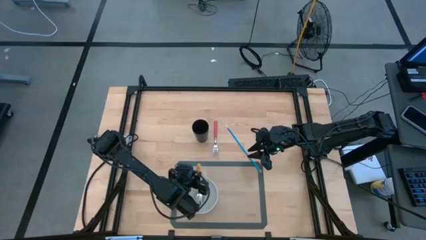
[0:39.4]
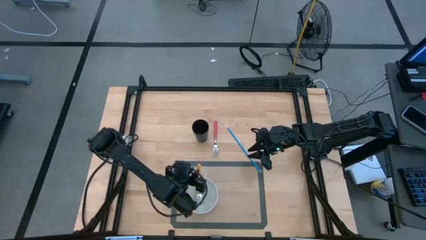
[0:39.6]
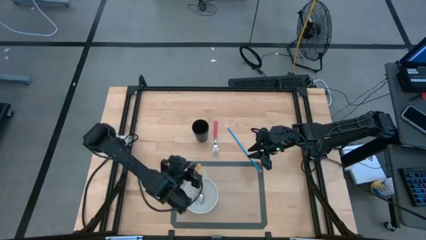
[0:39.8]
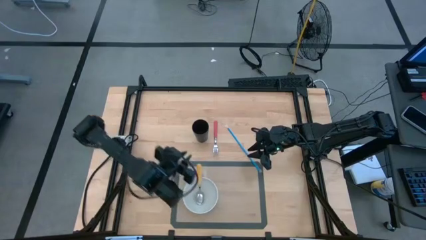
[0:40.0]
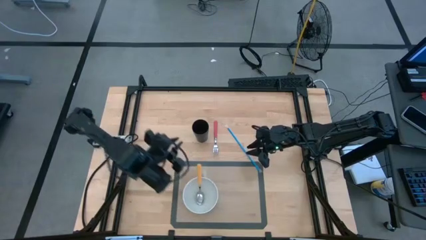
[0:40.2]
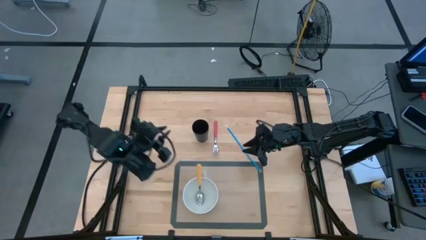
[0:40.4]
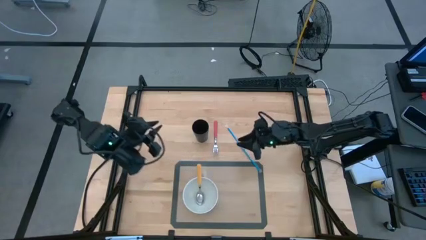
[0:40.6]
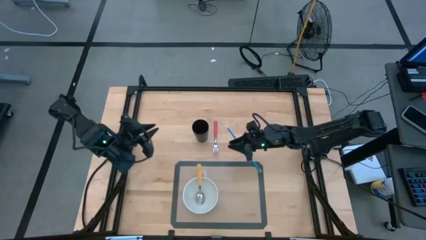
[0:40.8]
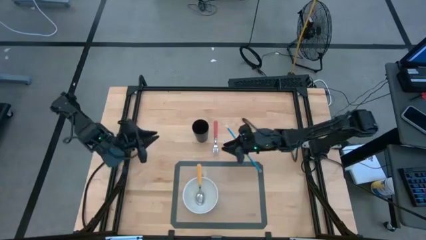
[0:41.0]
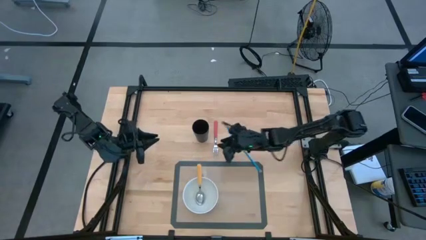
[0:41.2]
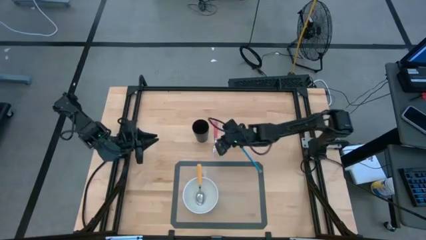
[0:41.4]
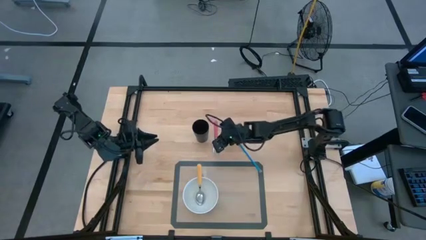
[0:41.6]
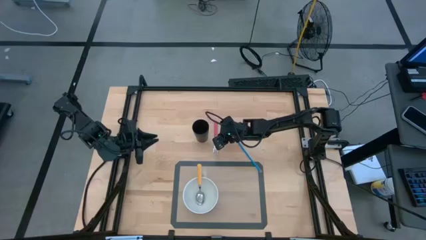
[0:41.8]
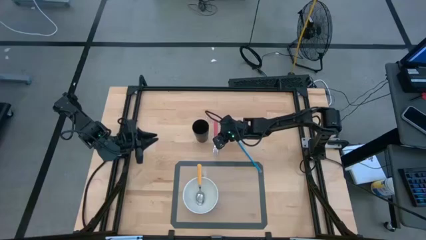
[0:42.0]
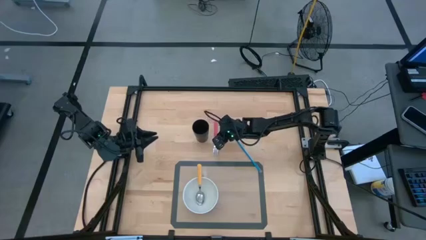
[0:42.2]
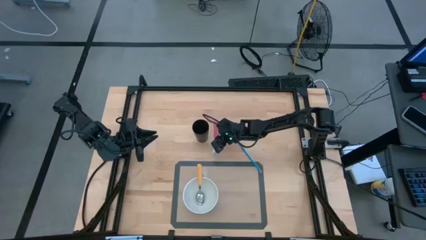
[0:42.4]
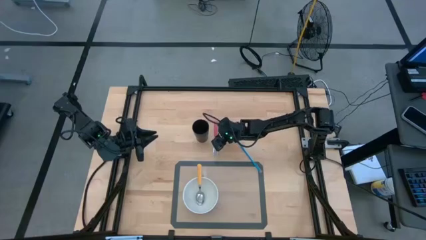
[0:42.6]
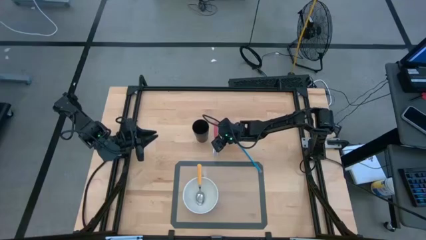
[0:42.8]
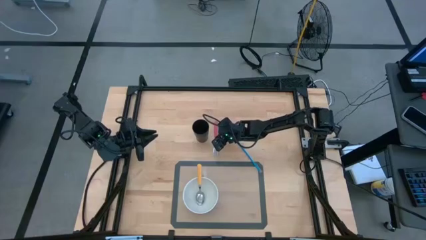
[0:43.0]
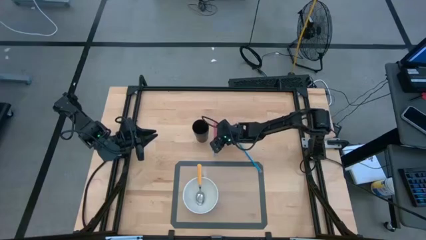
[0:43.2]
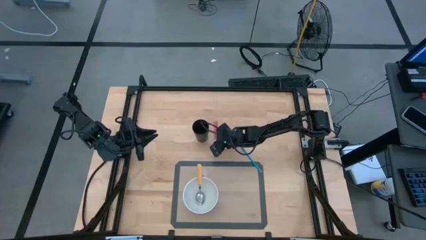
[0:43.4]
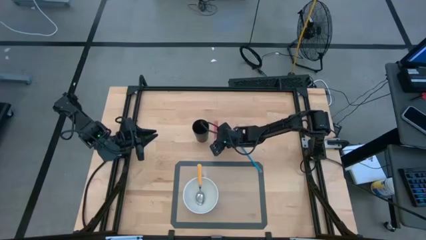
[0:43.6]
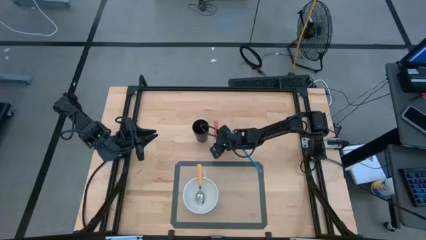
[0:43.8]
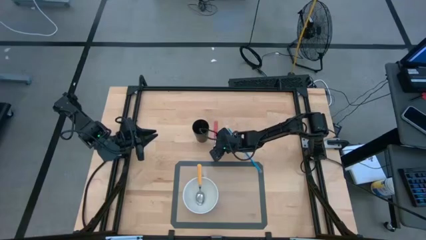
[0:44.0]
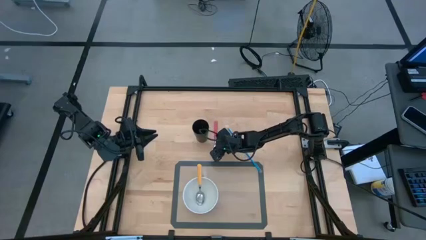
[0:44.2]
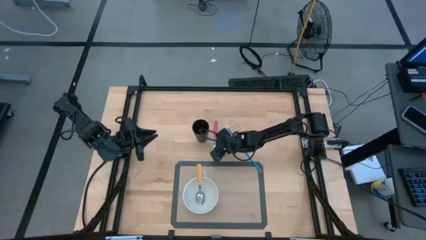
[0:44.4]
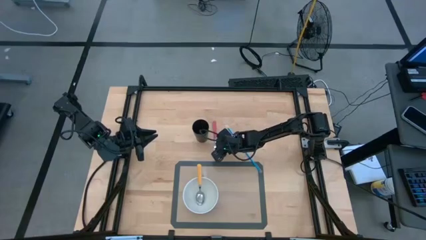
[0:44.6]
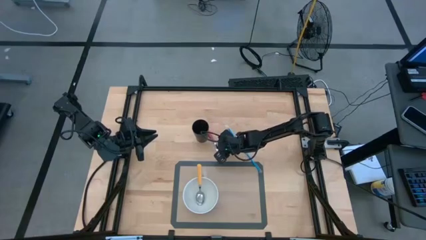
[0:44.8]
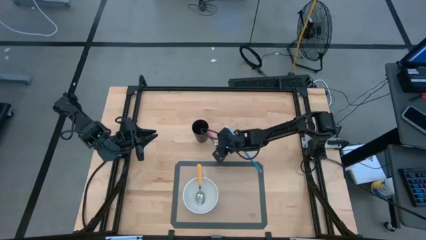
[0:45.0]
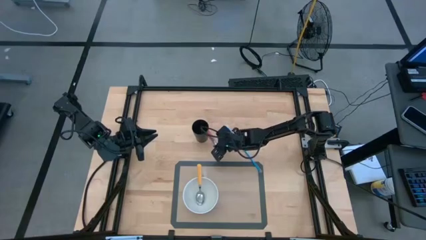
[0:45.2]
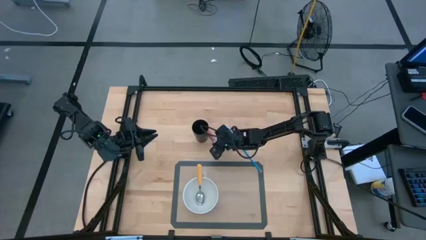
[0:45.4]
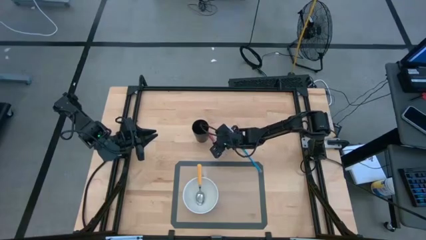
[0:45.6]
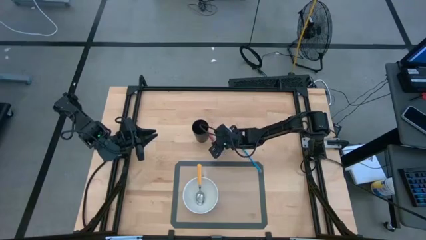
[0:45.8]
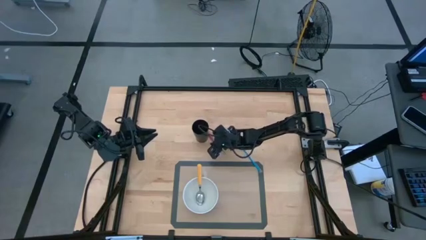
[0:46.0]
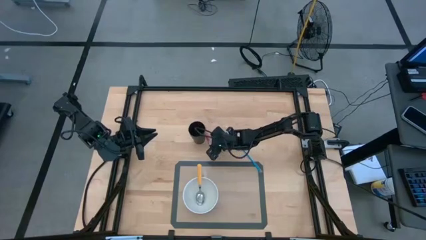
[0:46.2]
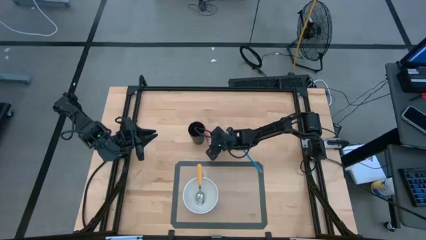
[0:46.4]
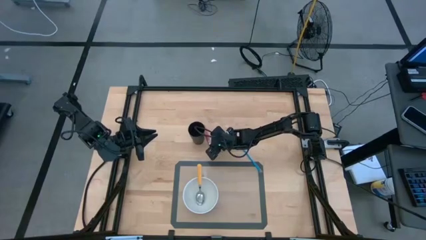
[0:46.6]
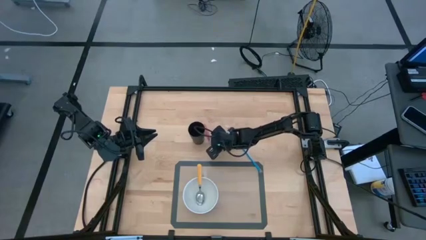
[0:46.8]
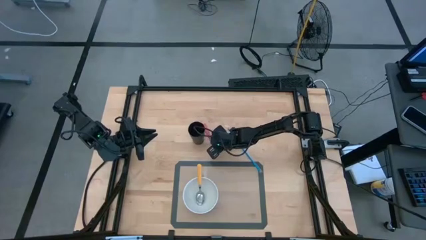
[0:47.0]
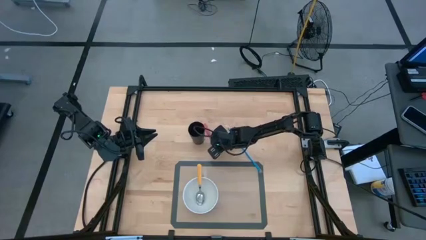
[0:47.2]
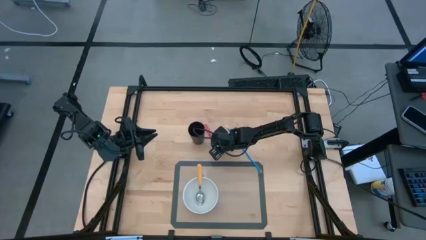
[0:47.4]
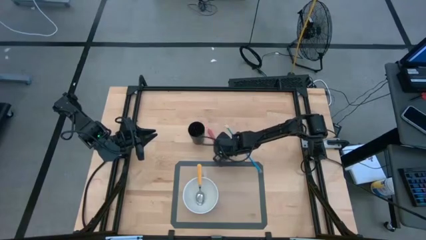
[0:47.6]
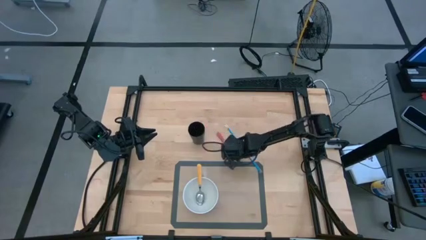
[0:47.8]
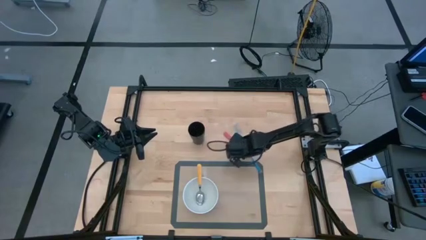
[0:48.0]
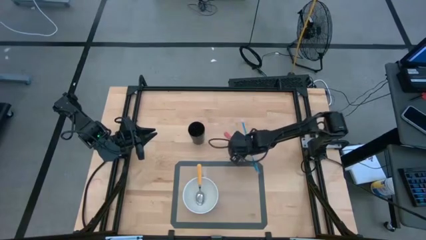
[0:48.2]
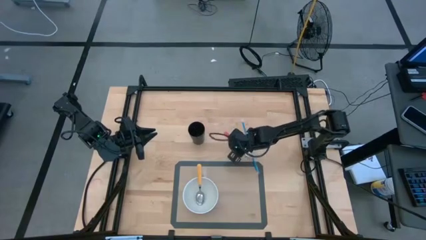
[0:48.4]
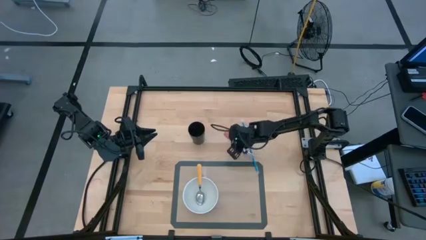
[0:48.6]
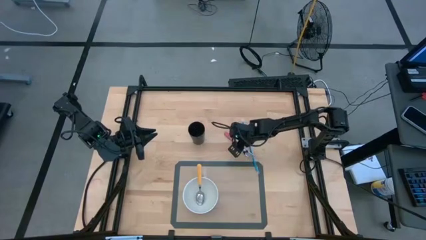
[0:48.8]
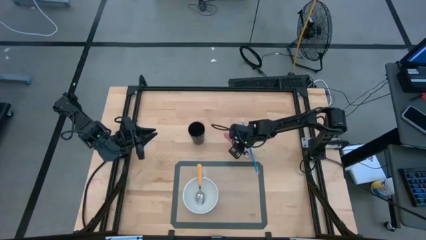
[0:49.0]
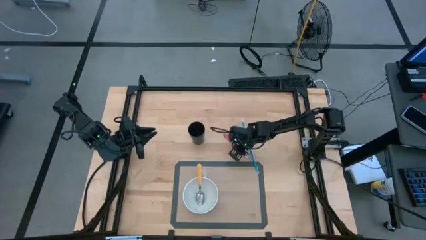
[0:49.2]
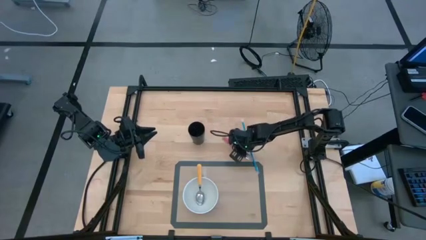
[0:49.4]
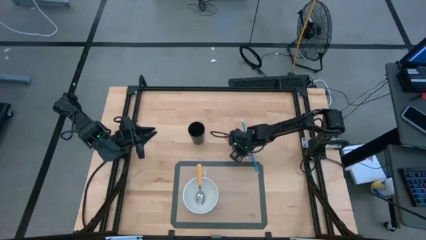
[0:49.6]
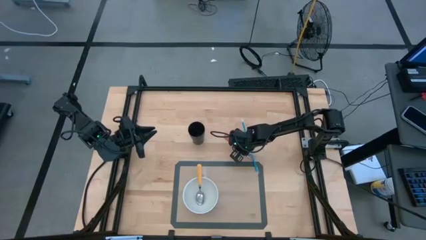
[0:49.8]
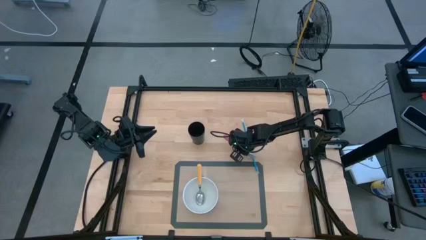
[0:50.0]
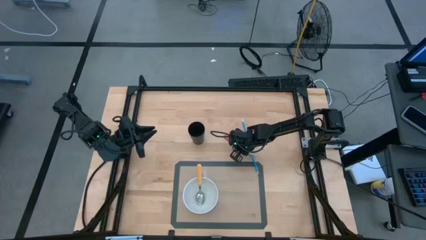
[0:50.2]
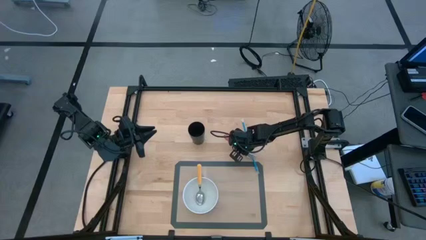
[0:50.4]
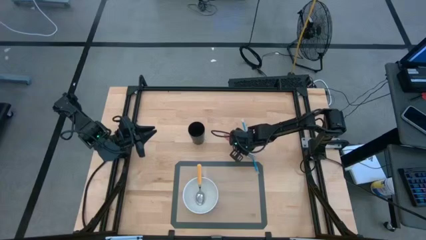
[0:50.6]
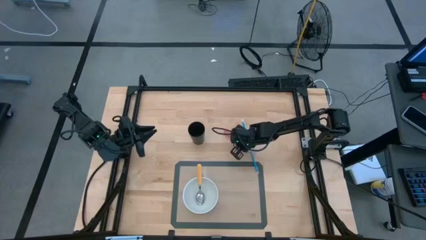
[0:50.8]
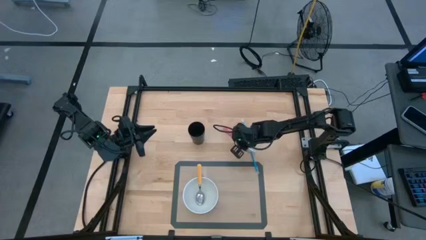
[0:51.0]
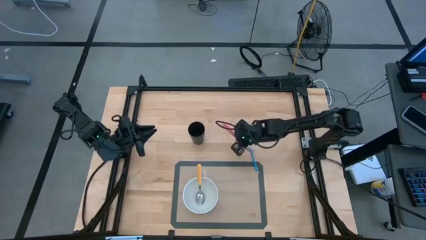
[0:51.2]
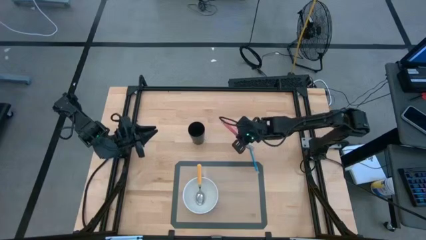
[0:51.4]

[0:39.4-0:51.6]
Task: Pick & Place Utensil
Put the pink fork into the white bowl on the mat

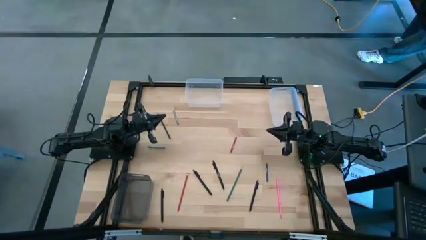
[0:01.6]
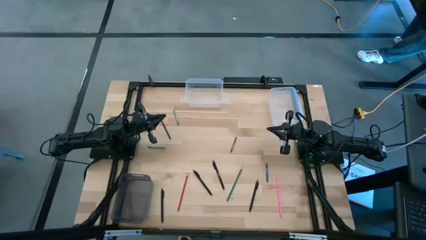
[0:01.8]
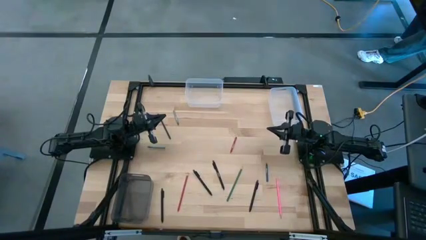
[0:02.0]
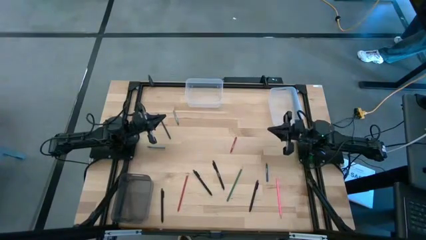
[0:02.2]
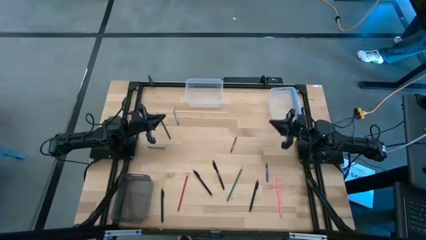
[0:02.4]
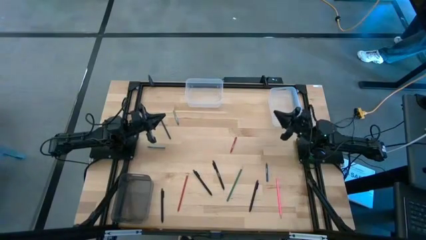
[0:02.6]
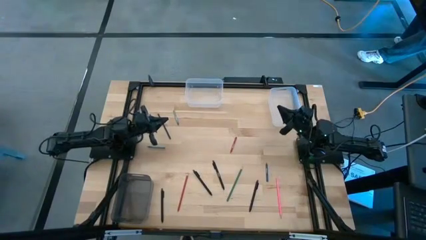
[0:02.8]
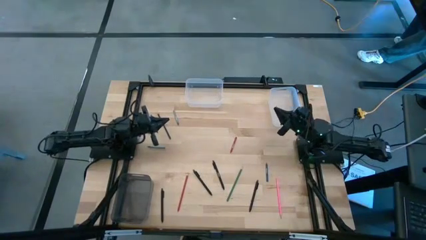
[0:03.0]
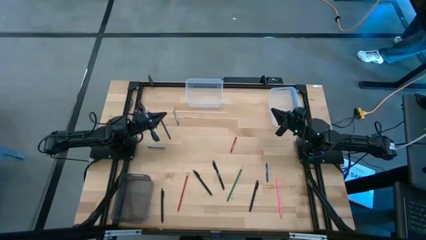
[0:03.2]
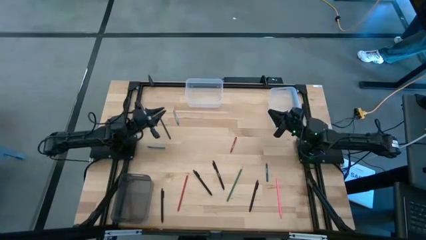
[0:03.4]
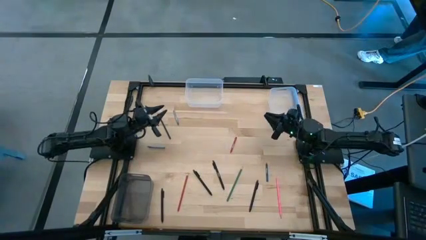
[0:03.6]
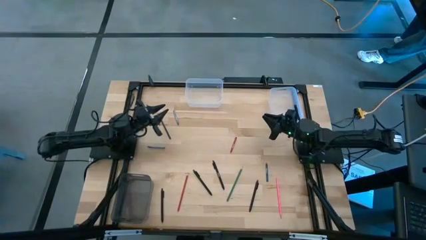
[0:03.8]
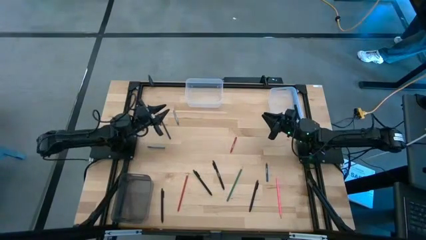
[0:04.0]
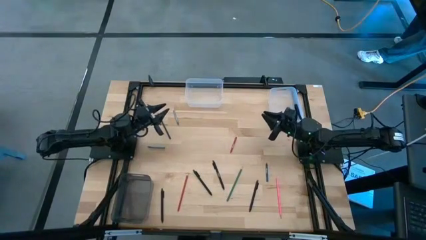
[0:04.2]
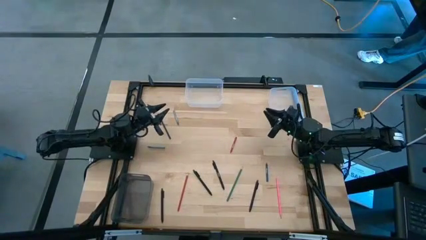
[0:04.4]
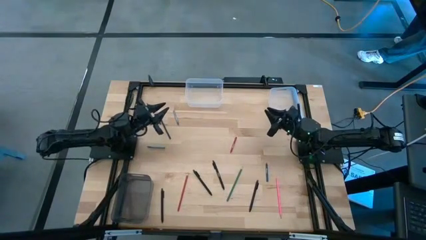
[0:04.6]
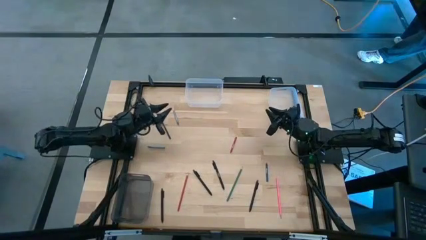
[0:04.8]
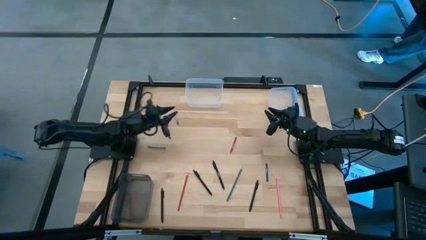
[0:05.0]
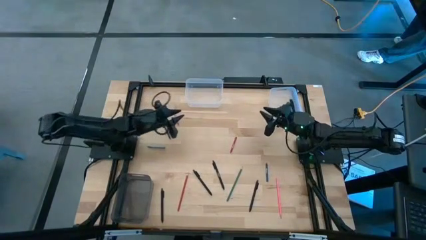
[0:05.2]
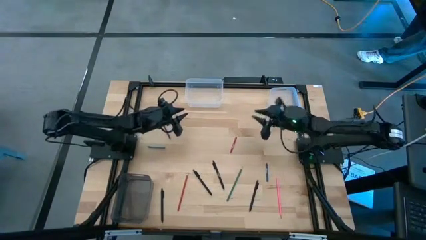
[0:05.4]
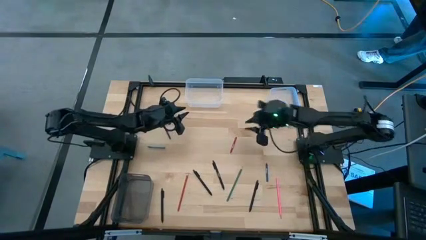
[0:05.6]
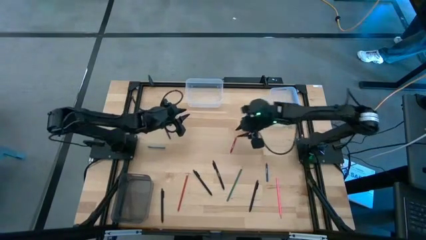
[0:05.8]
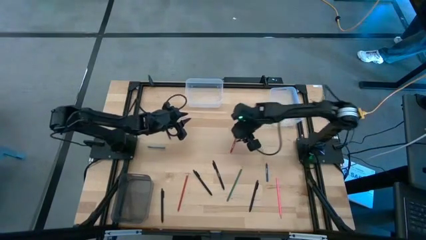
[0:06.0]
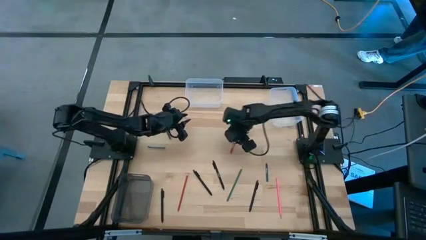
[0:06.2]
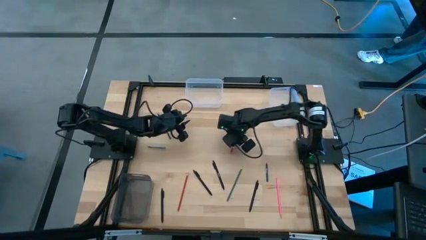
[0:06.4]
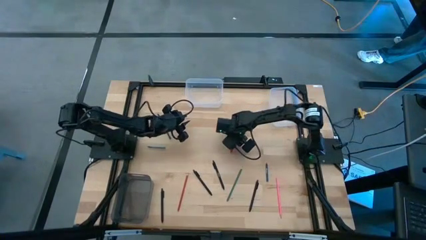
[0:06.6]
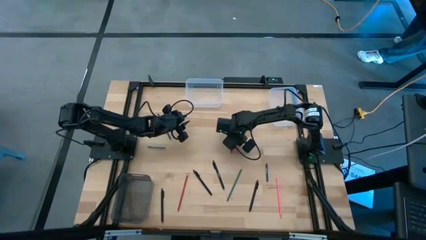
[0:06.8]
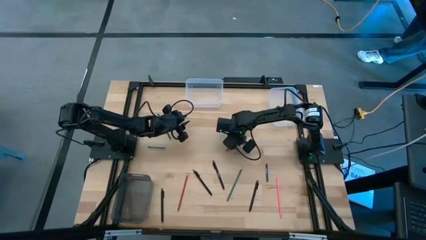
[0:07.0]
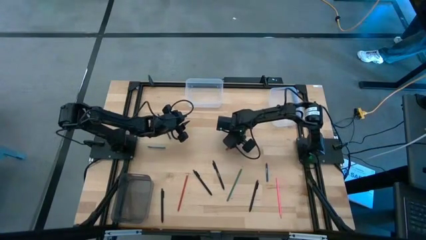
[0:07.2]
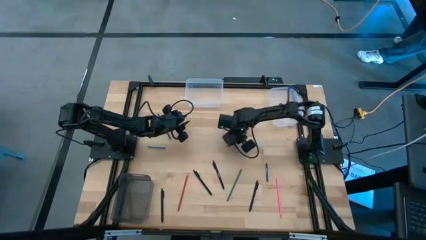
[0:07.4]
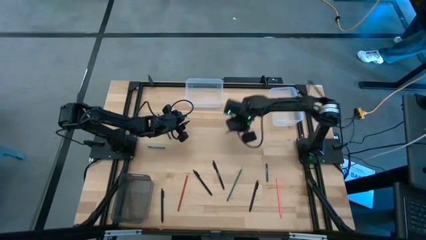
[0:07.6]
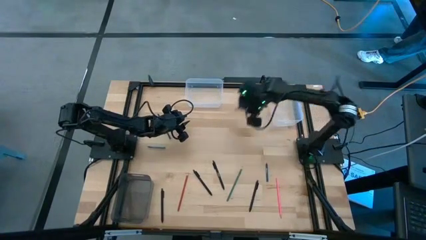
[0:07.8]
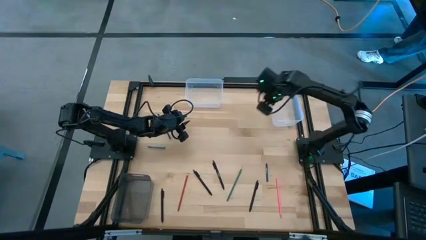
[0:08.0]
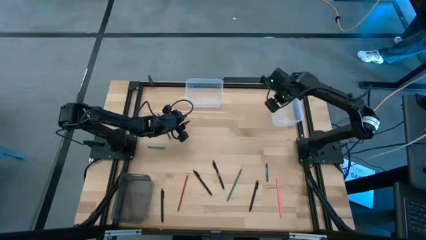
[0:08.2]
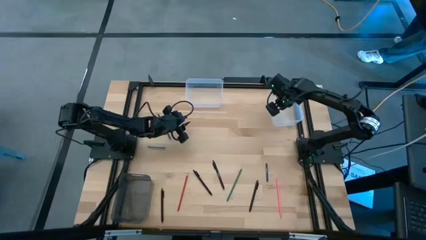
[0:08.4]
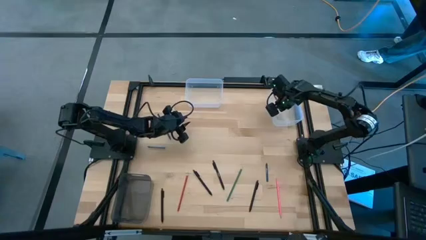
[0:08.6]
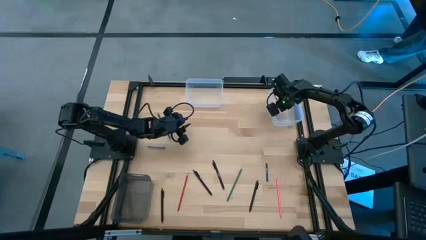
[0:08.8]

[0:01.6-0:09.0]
Task: Sort crayons/erasers/pens/pencils in bins
Put the red crayon into the right transparent bin
